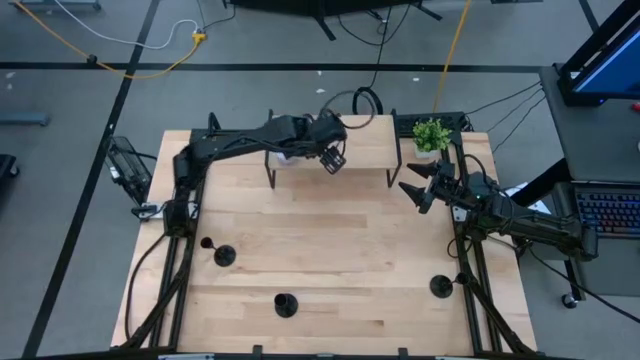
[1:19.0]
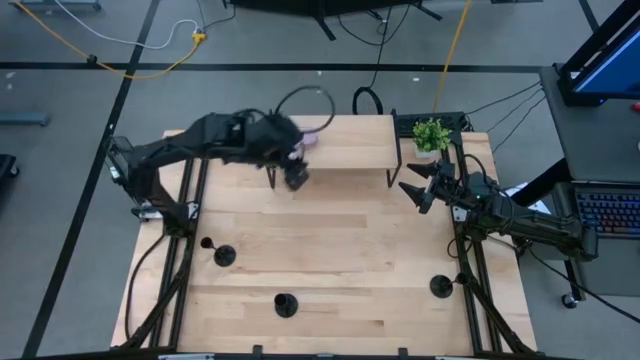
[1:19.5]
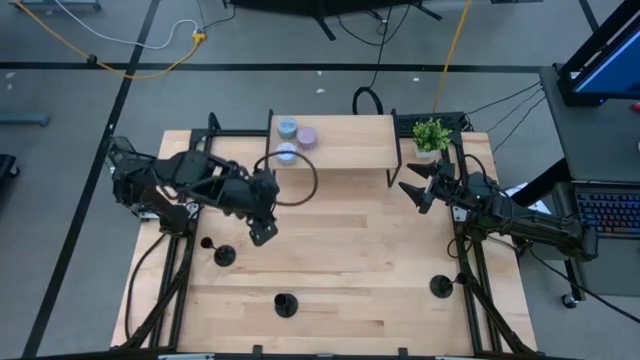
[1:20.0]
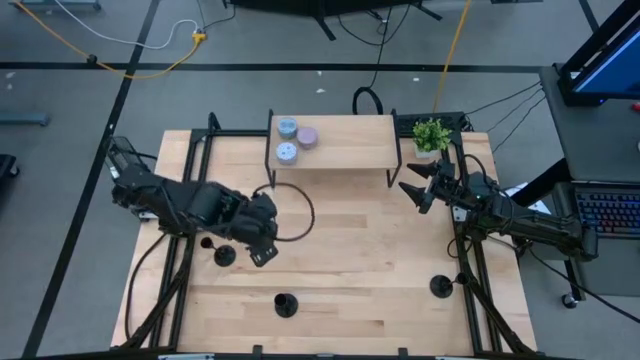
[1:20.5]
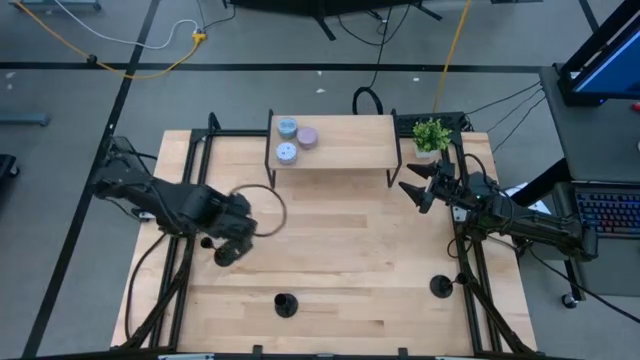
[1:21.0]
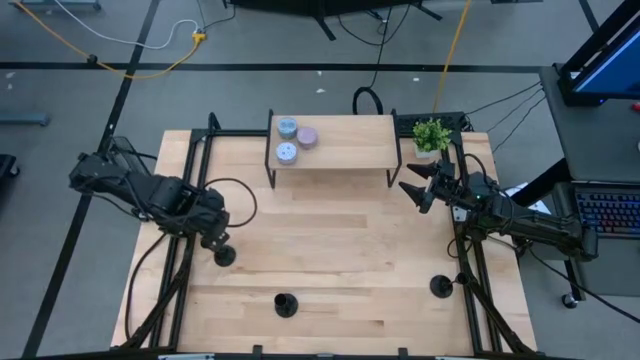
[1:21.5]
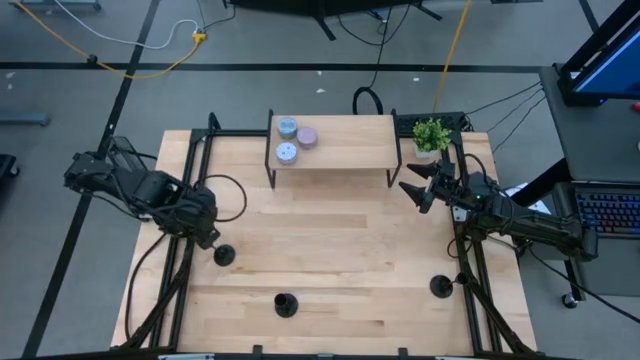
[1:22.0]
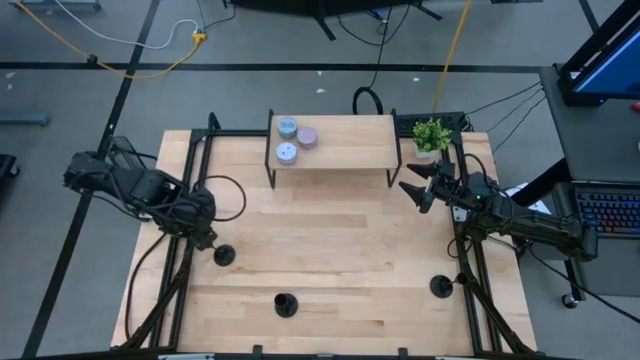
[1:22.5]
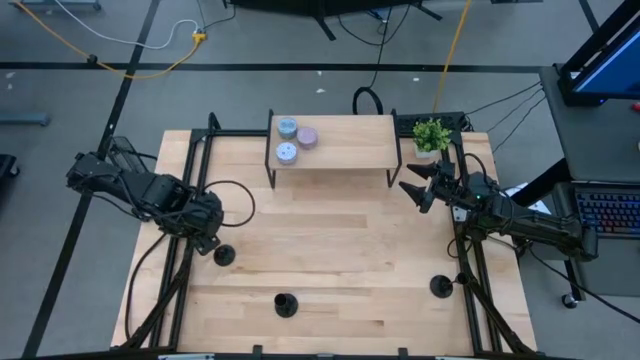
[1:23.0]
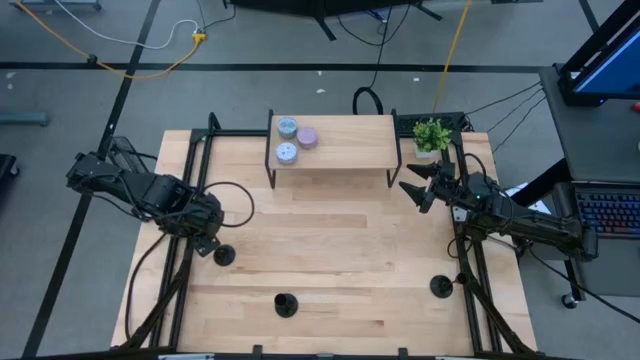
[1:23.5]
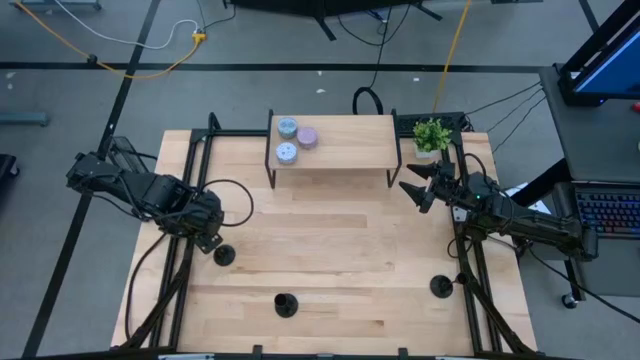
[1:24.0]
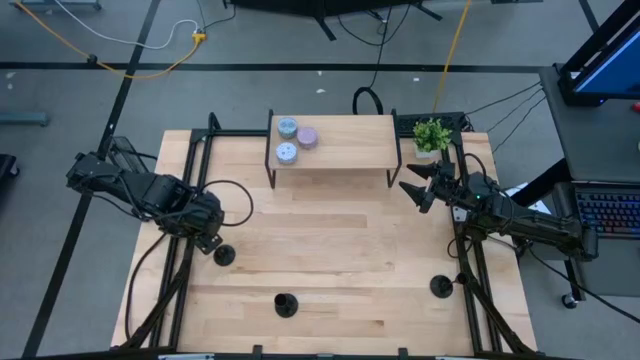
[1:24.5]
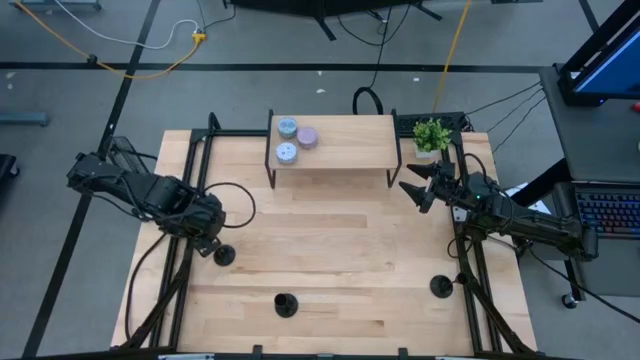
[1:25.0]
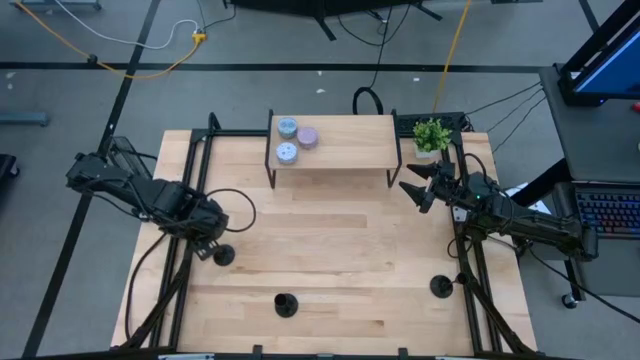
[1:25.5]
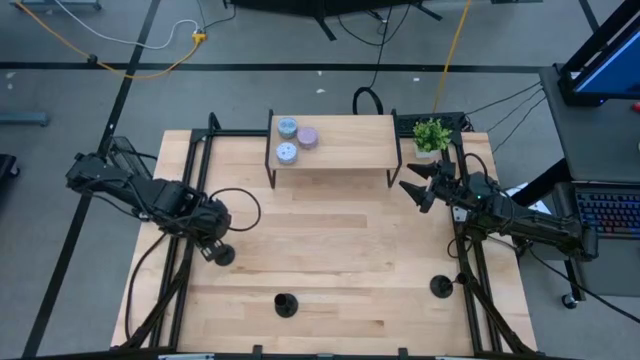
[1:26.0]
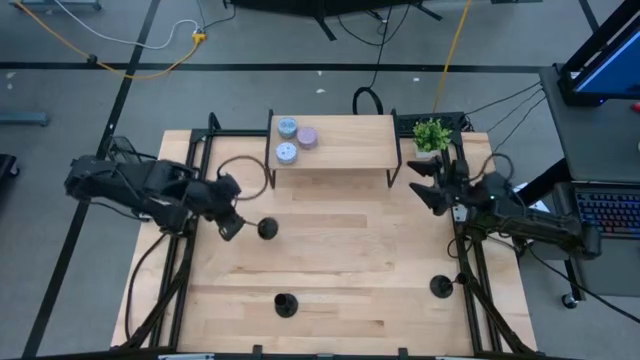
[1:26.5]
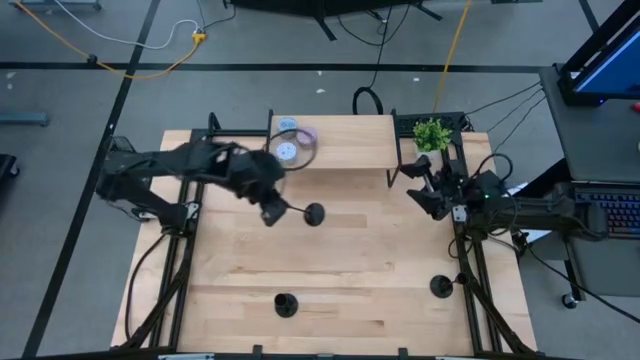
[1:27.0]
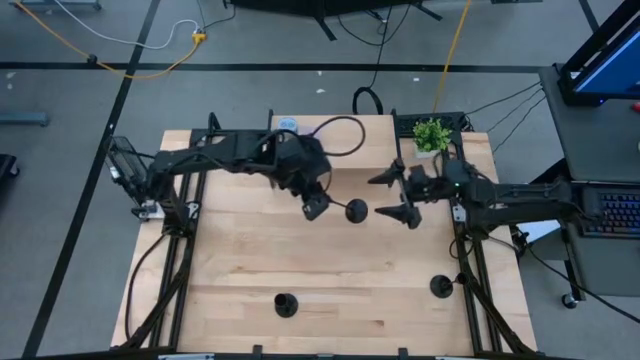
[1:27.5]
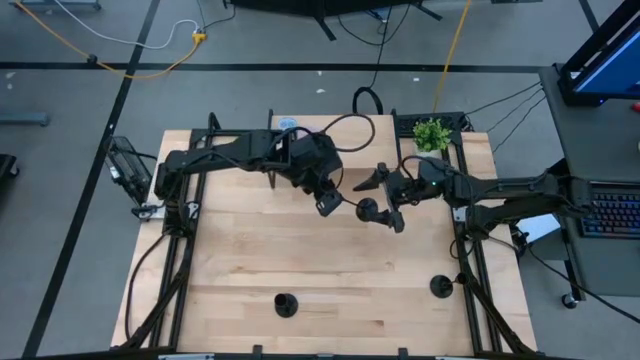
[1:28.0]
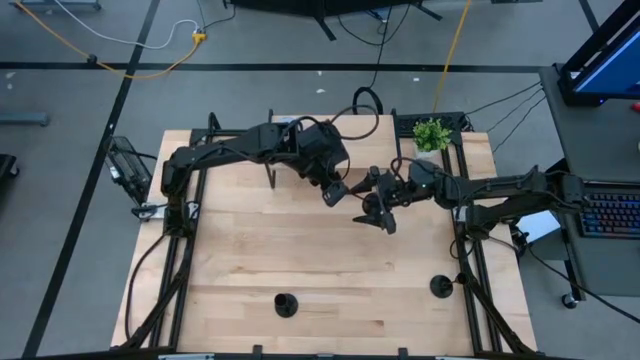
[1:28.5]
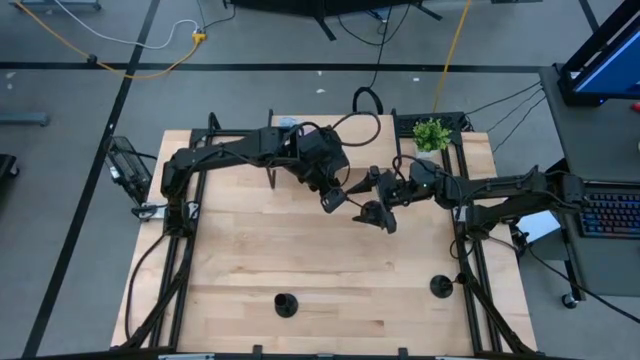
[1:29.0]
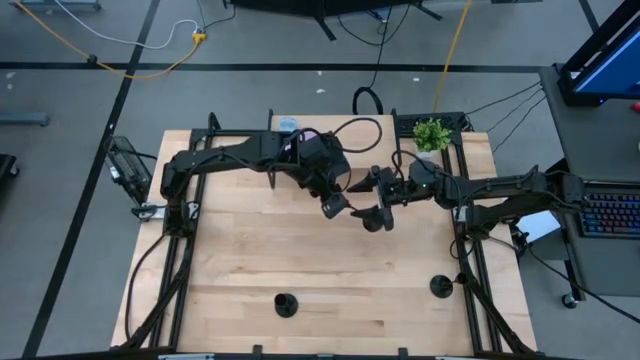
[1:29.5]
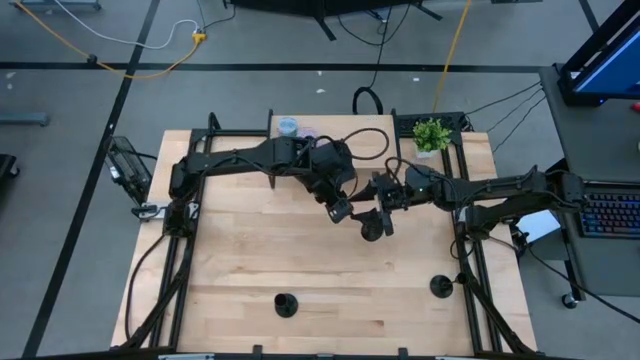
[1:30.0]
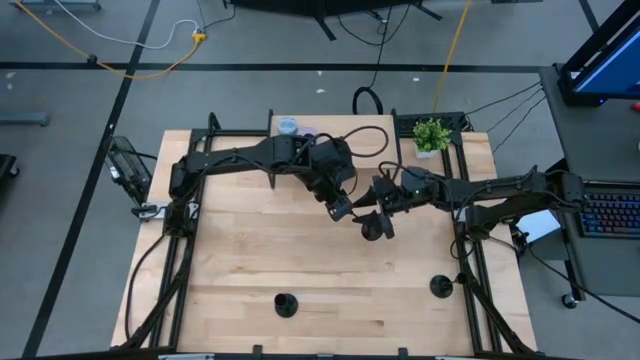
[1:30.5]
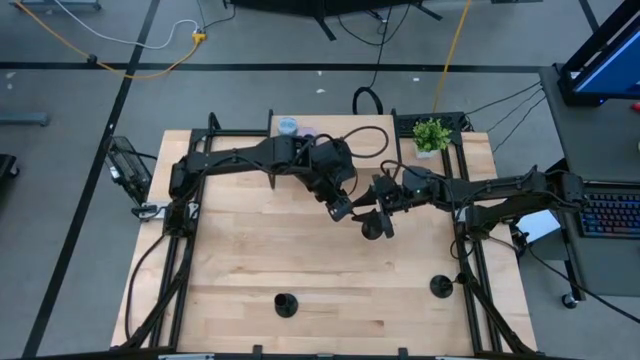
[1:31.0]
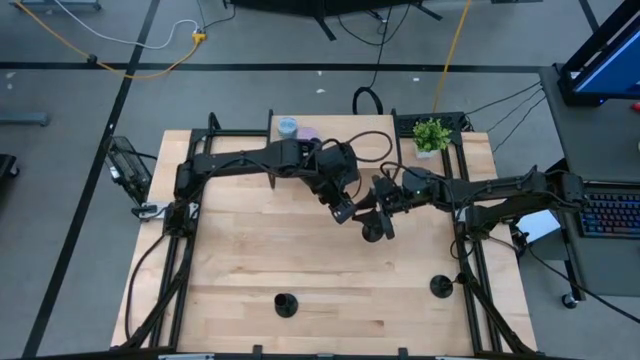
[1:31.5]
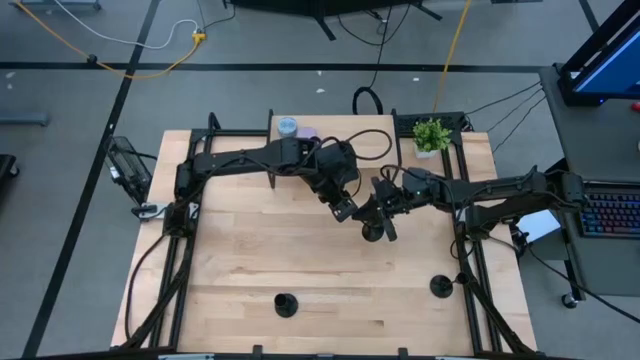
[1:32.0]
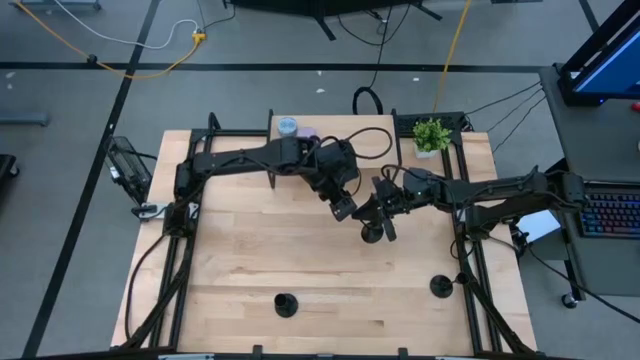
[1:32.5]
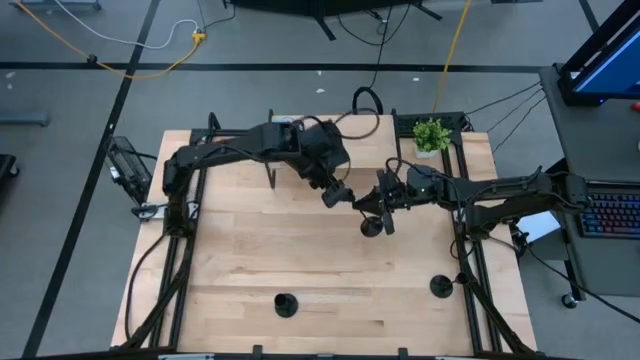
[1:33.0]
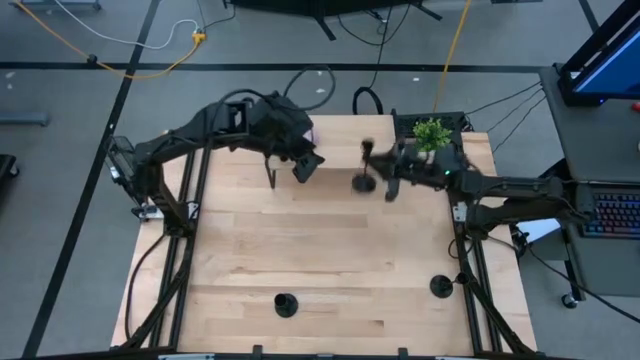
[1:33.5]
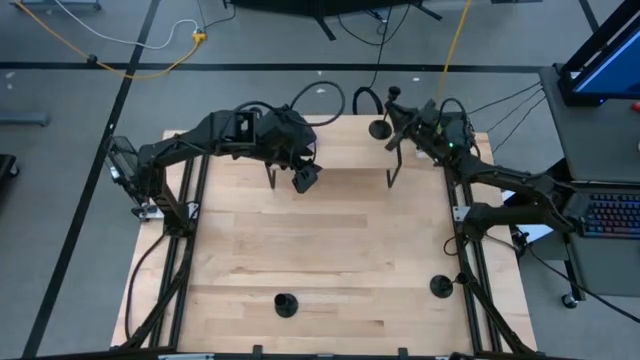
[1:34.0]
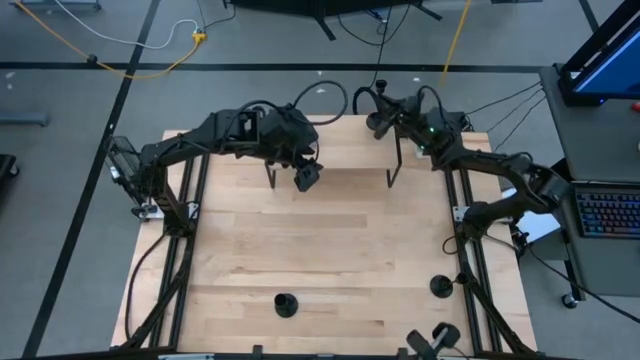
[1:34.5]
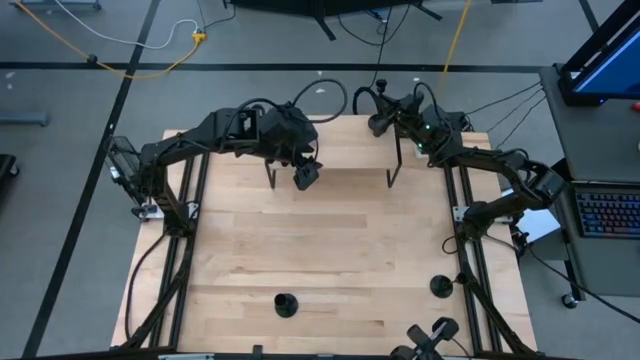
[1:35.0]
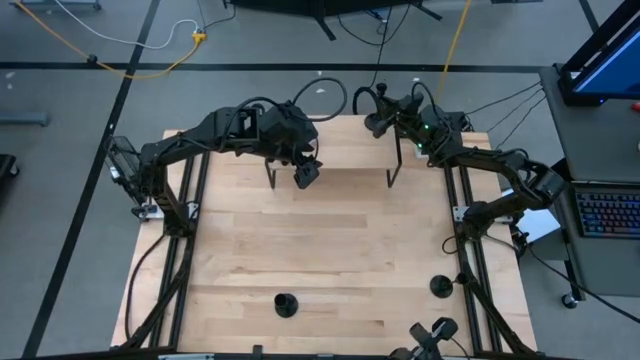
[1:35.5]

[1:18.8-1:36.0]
Task: Pick & Place candle stick holders
Put the left black candlestick holder on the shelf

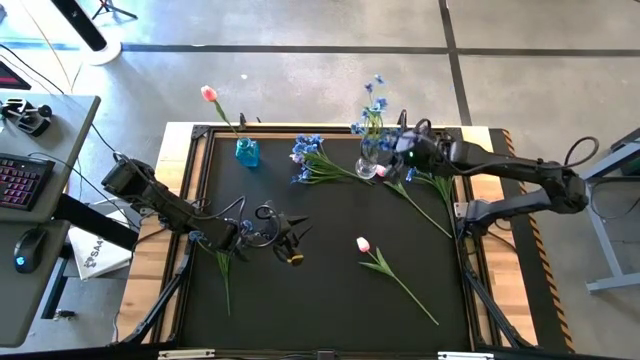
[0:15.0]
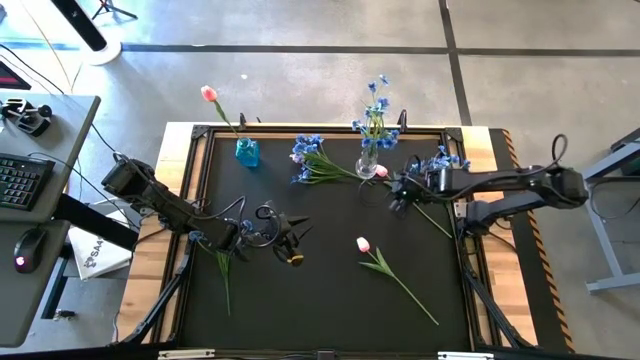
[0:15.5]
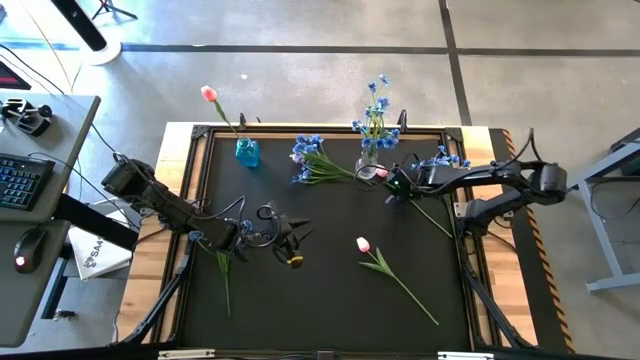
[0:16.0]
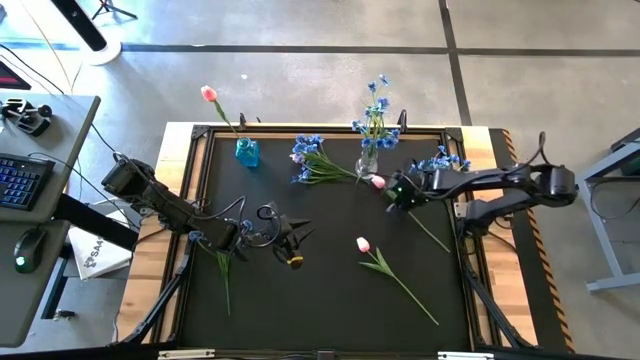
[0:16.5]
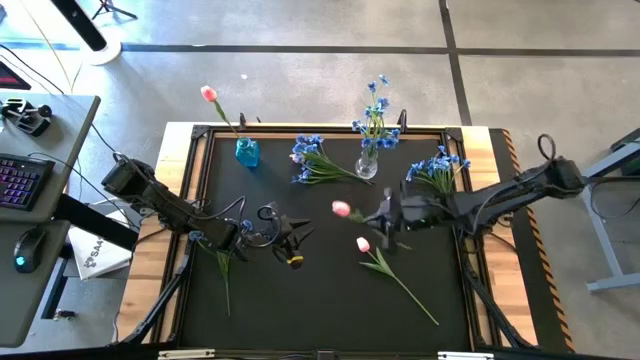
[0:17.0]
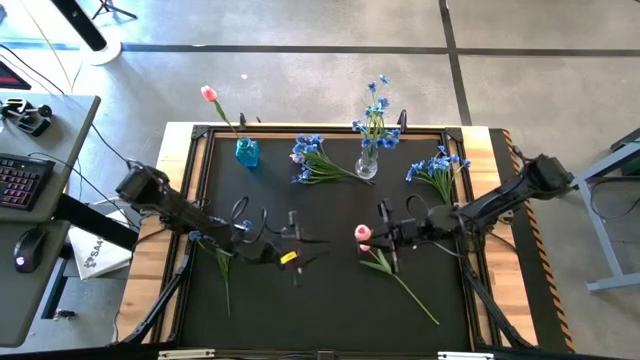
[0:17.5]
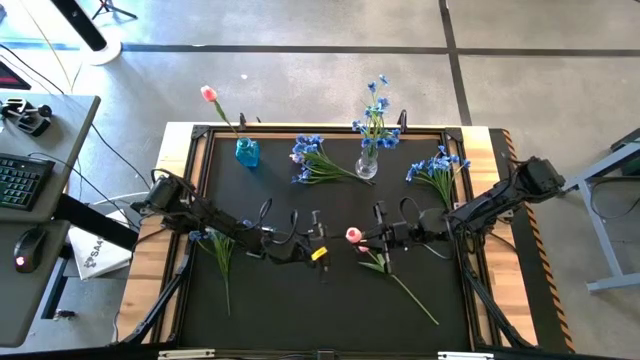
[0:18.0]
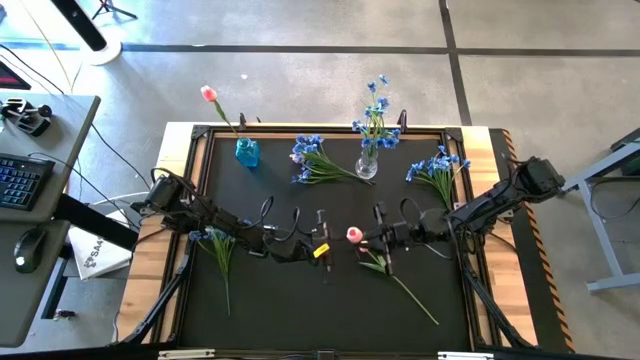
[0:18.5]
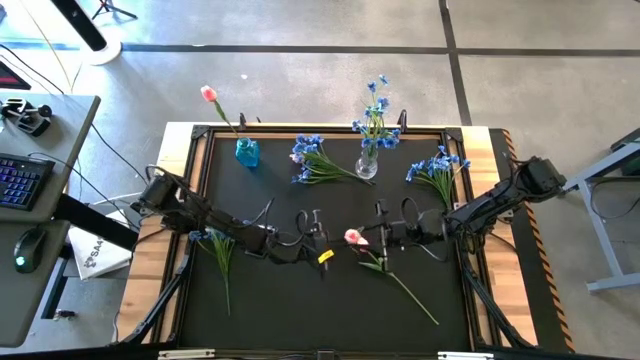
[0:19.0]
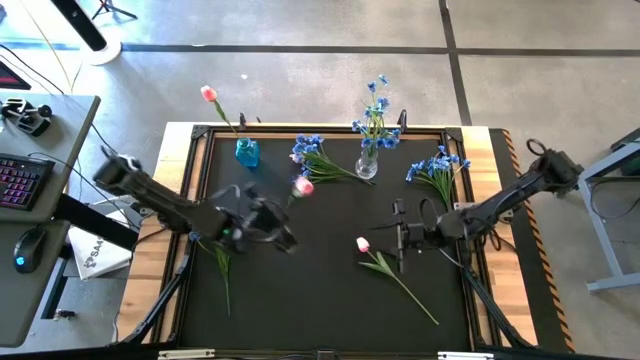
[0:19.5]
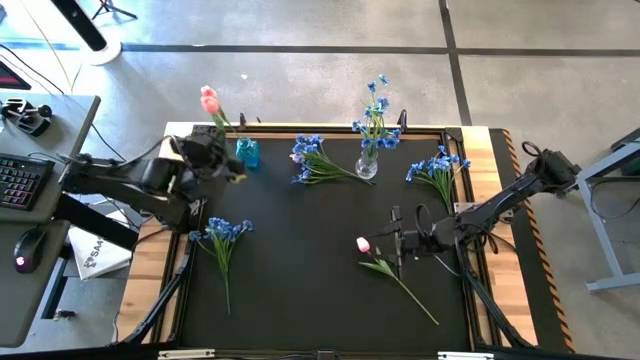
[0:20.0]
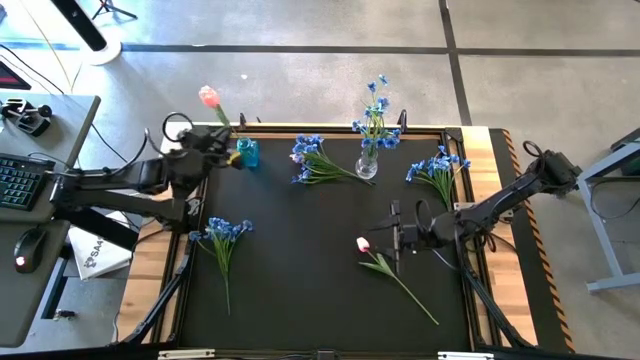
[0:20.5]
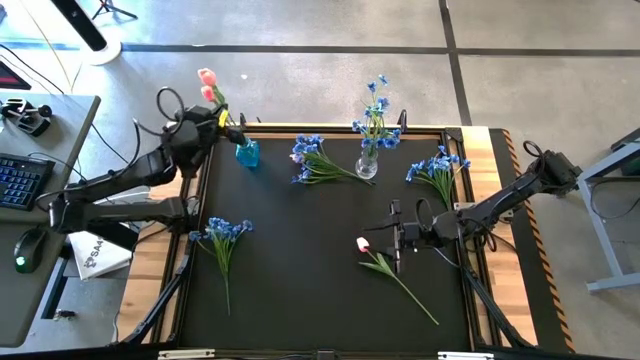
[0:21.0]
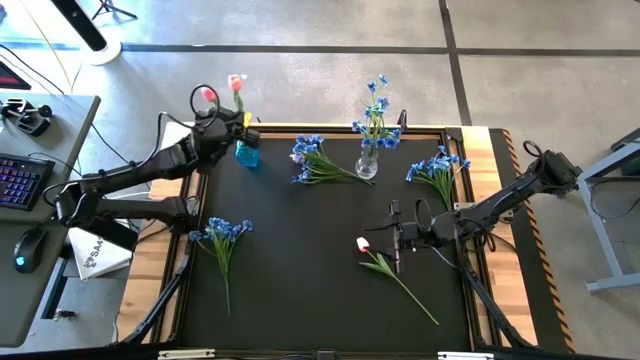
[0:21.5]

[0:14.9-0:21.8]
Task: Sort flowers into vase by color
Put the pink tulip flower into the blue flower vase
